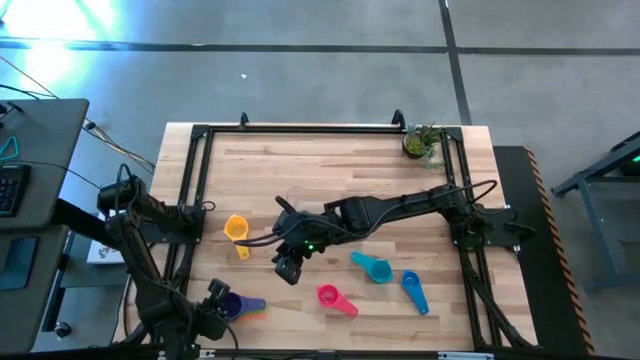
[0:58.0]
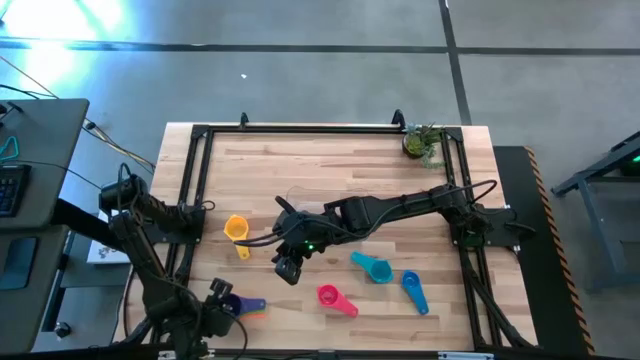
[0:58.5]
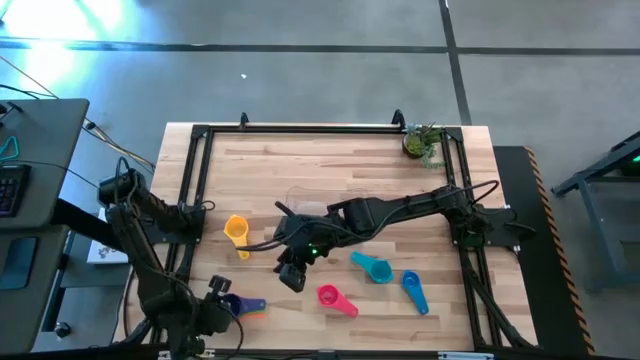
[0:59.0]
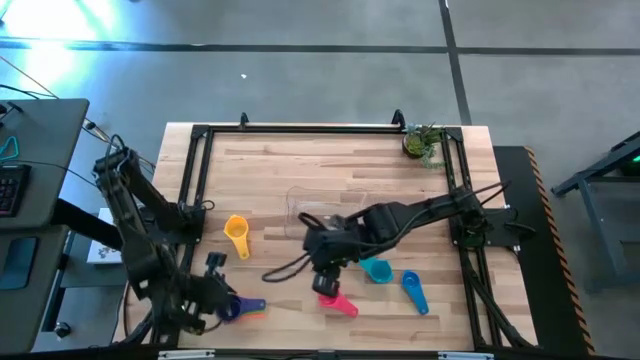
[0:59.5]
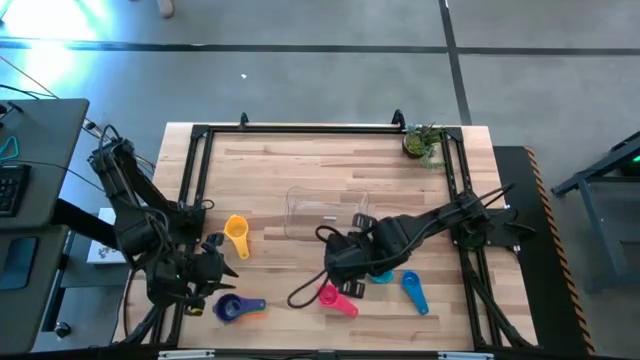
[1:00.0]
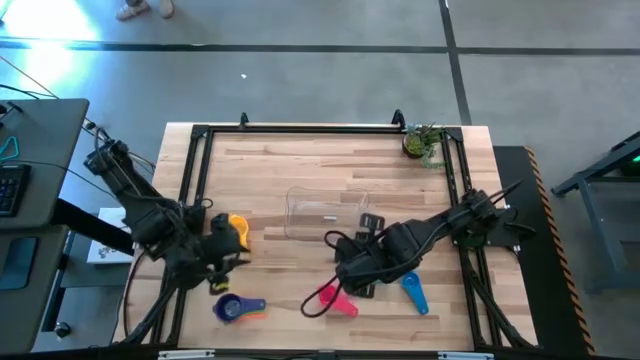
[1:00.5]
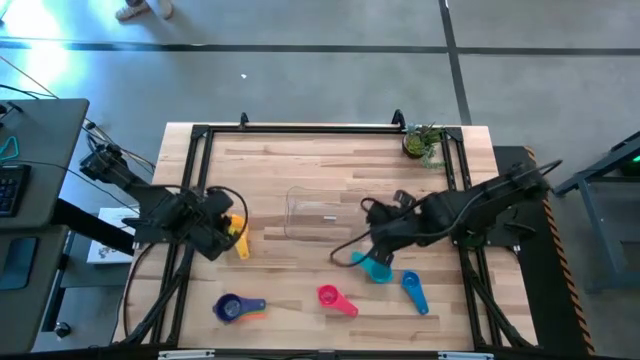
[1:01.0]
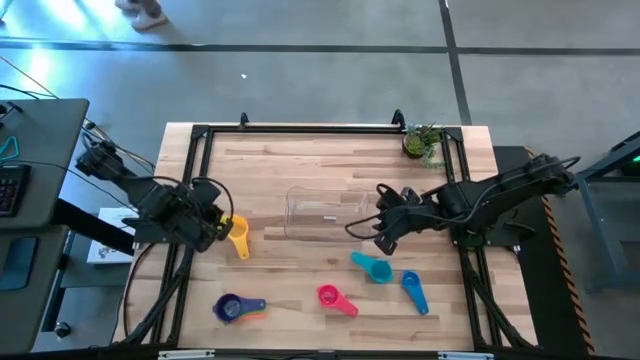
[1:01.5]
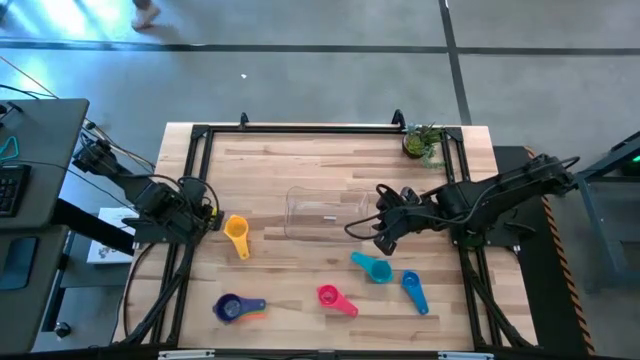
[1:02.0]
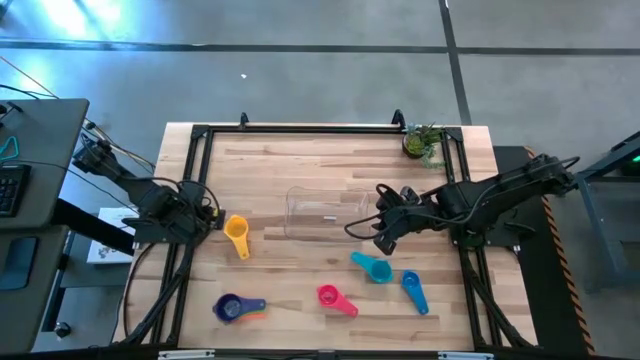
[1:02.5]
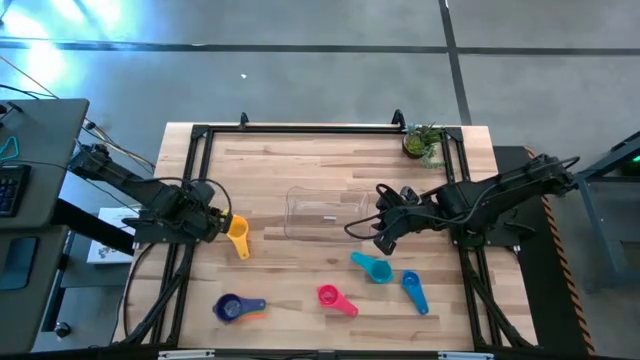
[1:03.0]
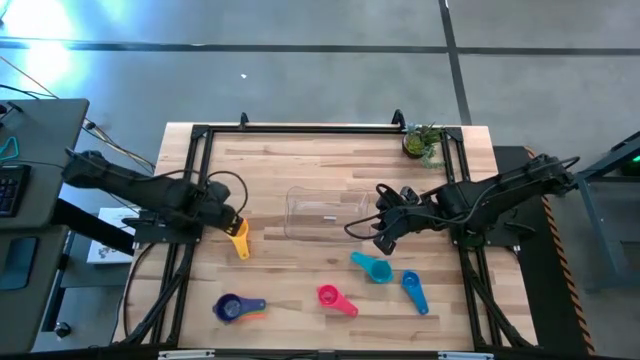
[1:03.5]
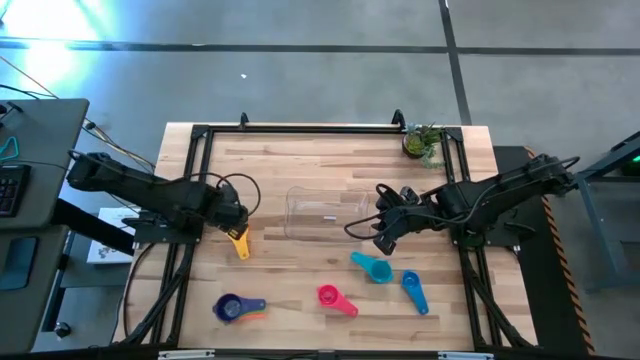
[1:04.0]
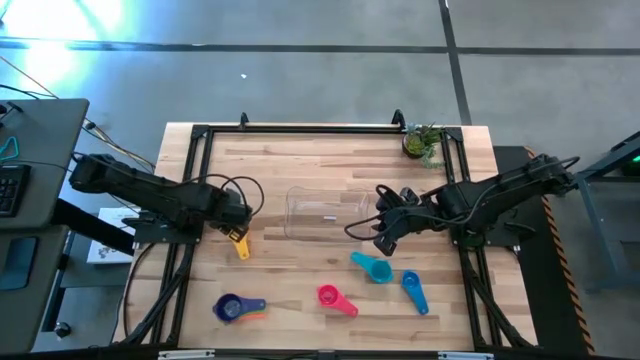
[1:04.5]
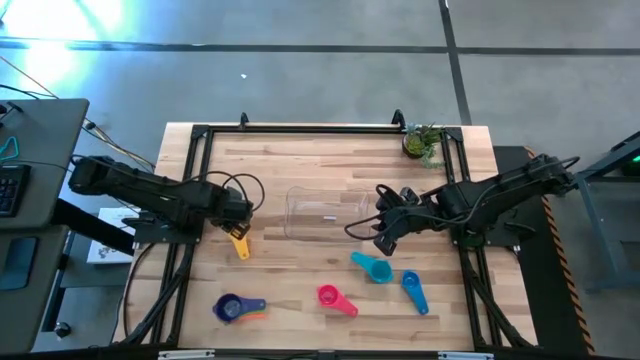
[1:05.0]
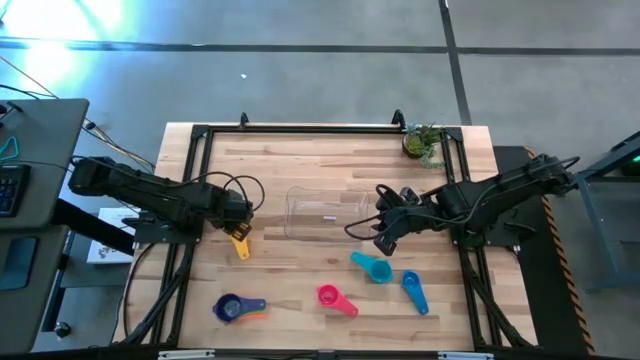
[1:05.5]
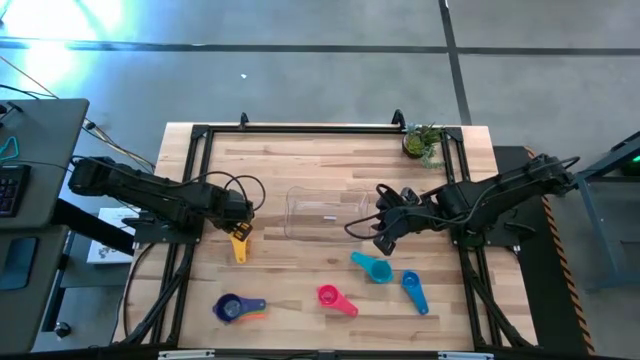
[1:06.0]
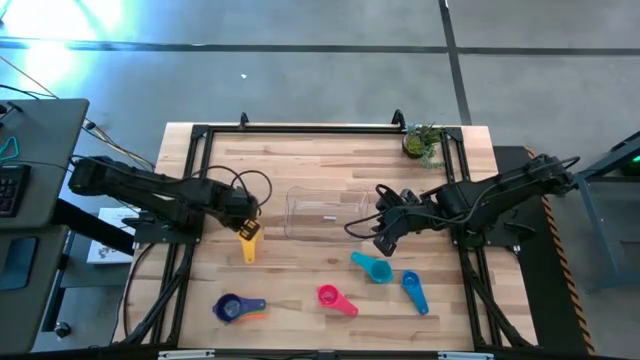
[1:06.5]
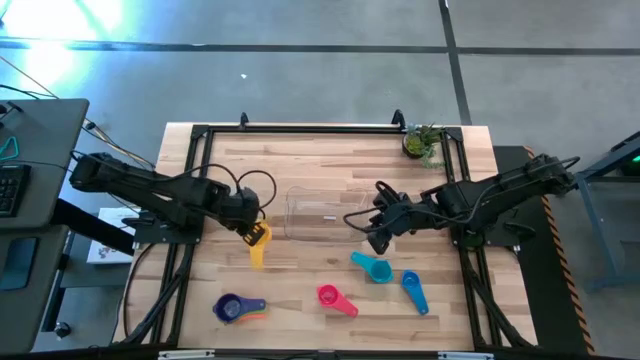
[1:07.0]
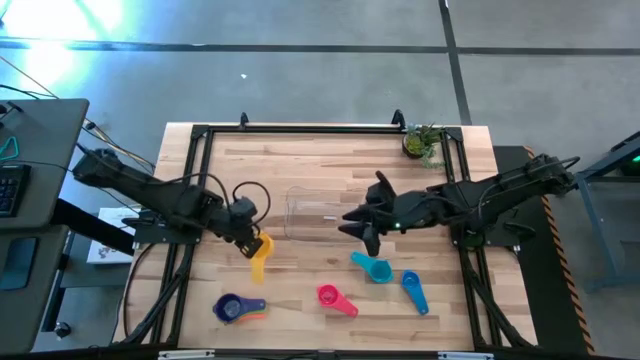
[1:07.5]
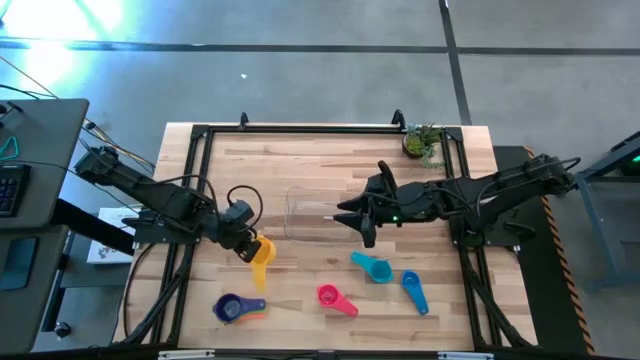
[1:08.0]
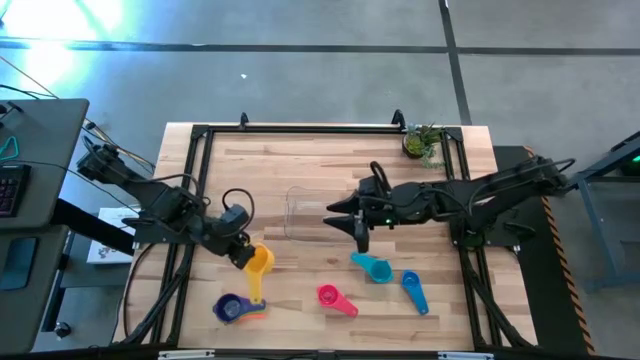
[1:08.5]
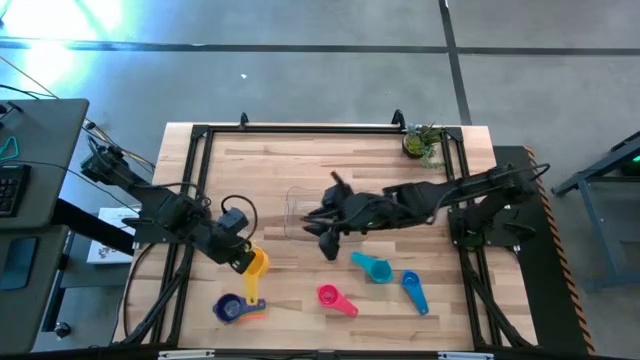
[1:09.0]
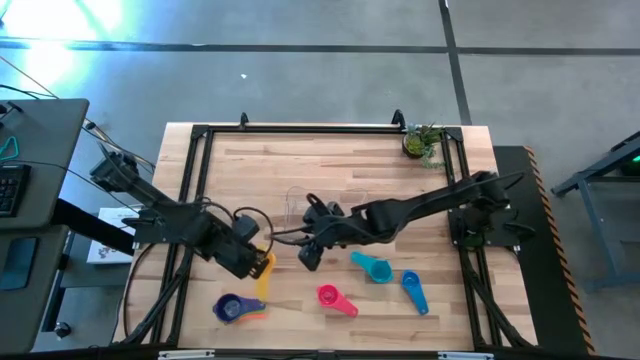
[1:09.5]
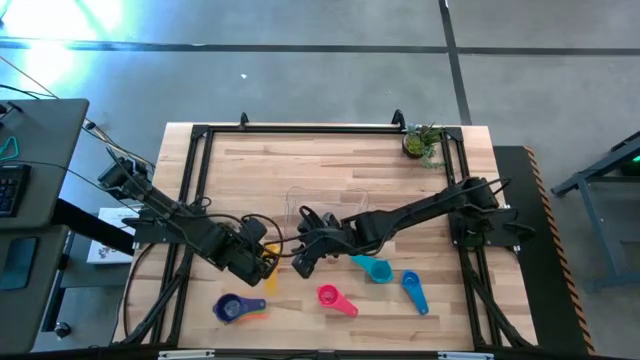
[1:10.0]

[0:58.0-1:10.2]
Task: Nest measuring cups in basket
Stack the yellow measuring cup on top of the dark blue measuring cup

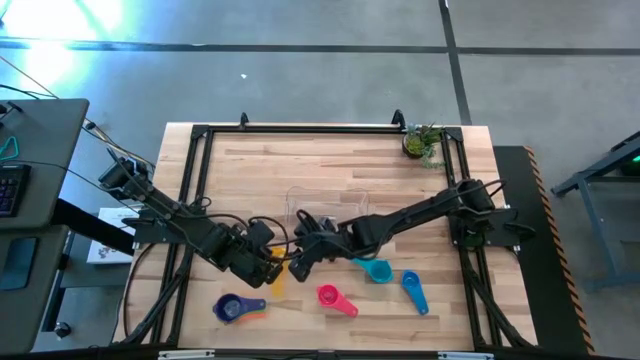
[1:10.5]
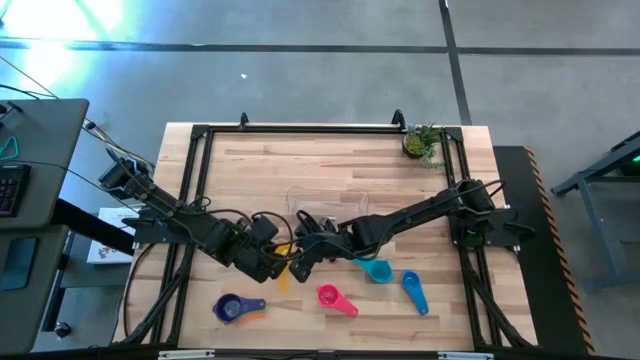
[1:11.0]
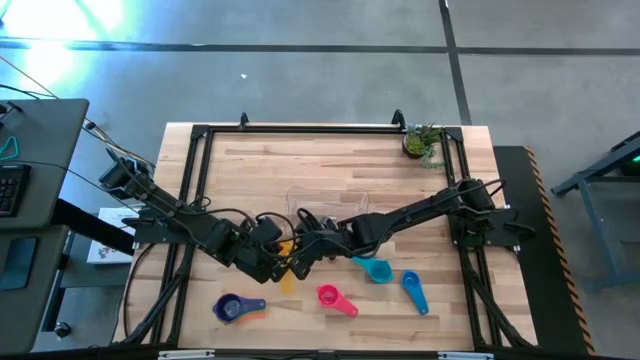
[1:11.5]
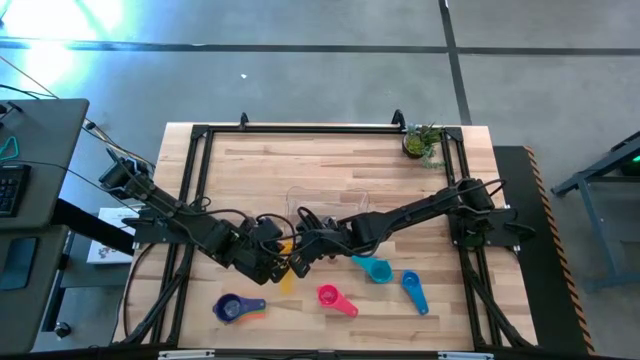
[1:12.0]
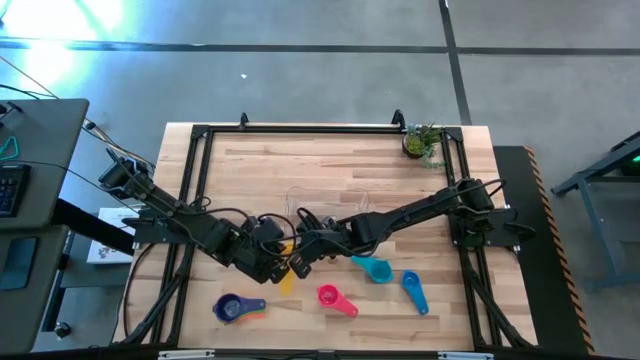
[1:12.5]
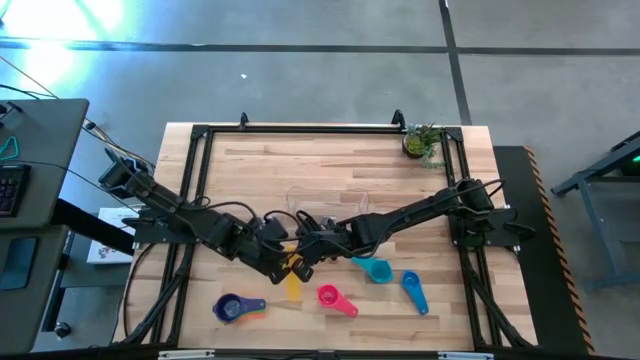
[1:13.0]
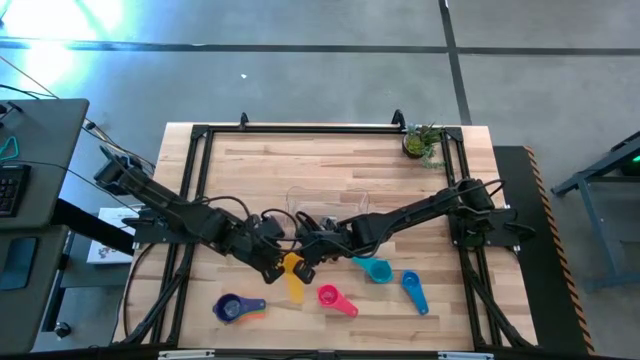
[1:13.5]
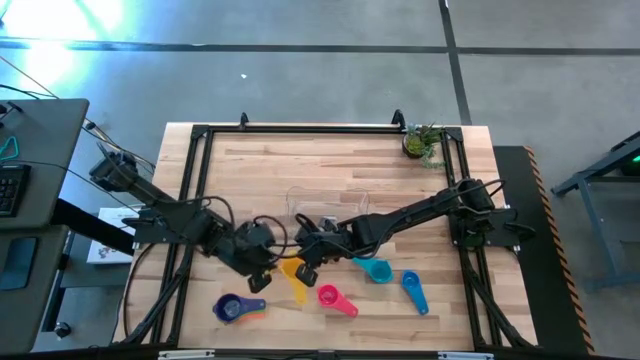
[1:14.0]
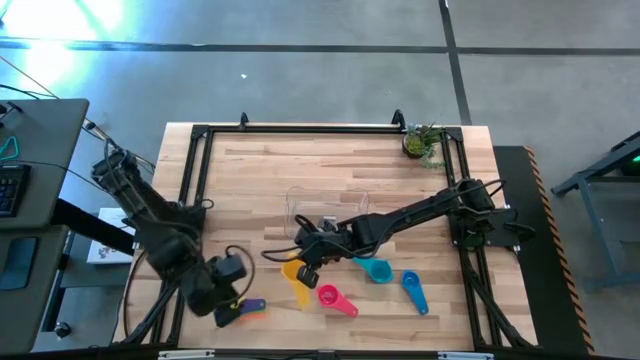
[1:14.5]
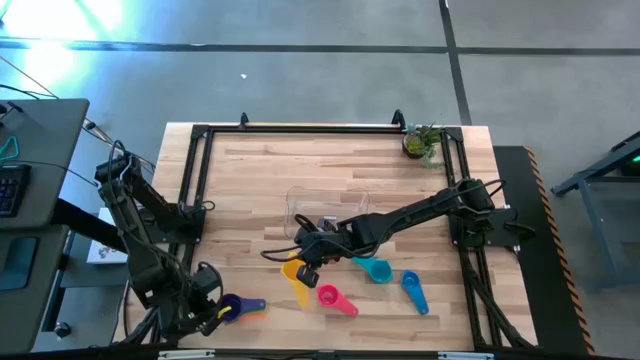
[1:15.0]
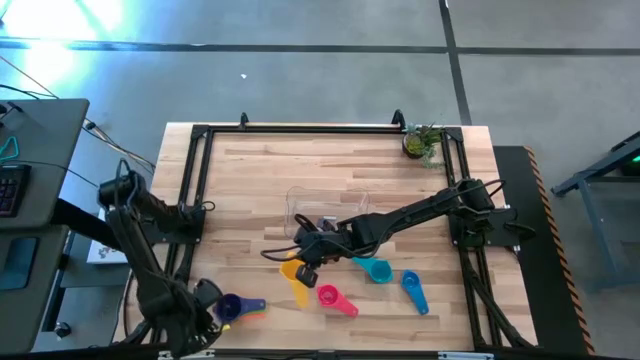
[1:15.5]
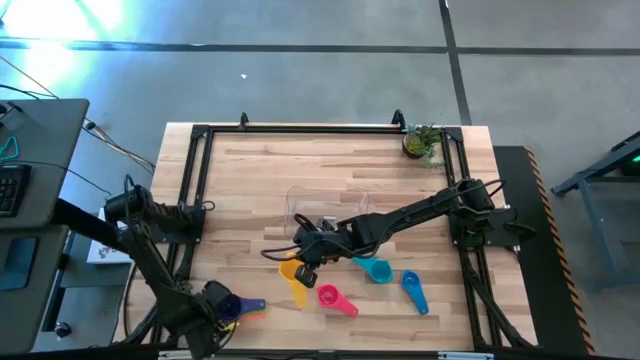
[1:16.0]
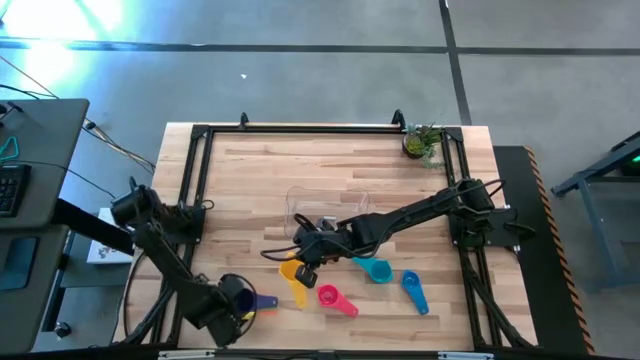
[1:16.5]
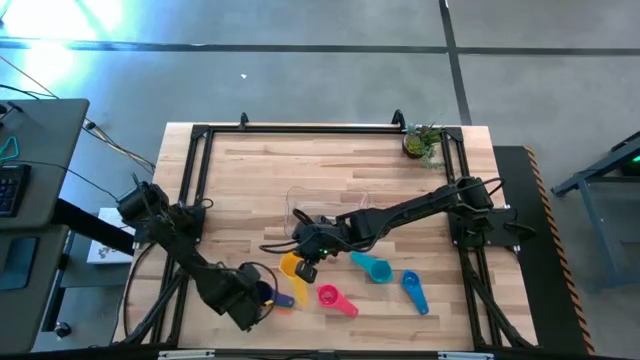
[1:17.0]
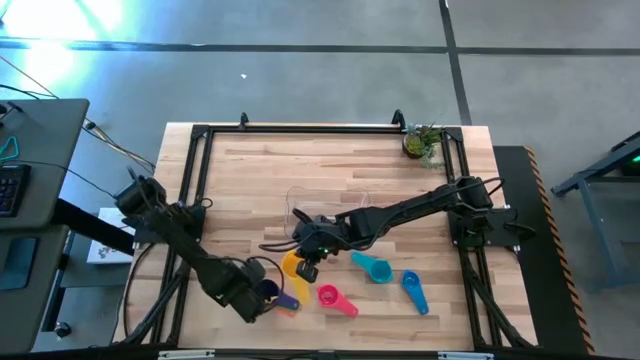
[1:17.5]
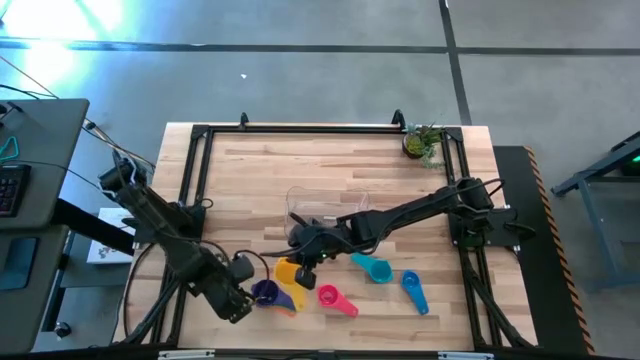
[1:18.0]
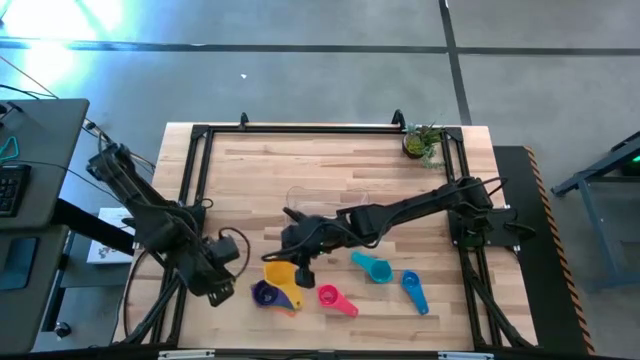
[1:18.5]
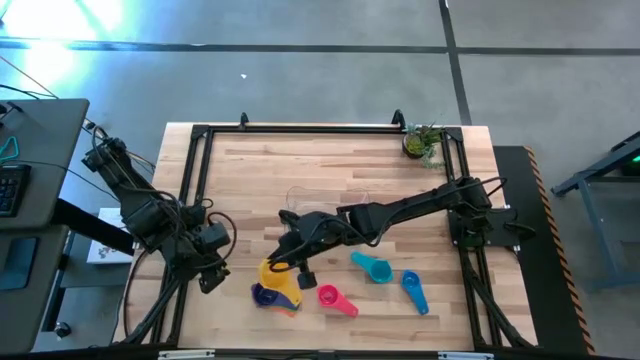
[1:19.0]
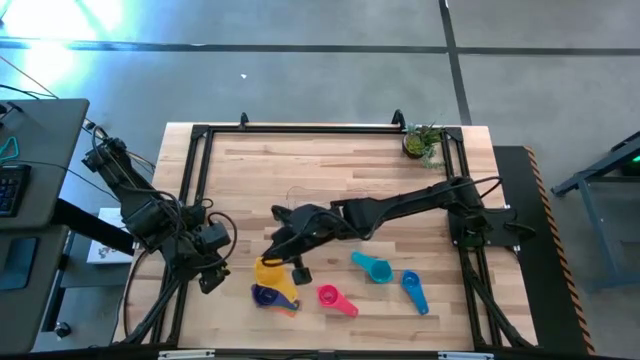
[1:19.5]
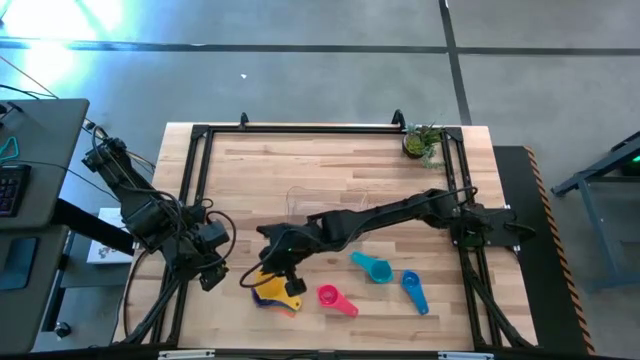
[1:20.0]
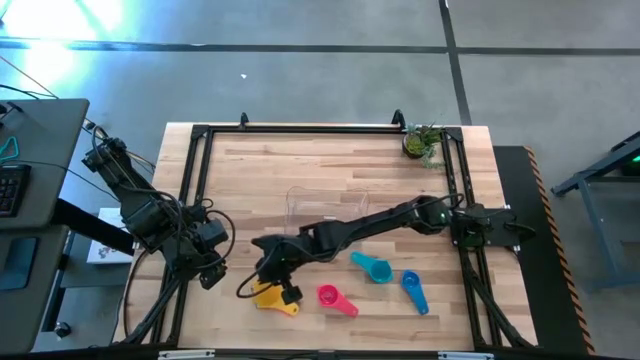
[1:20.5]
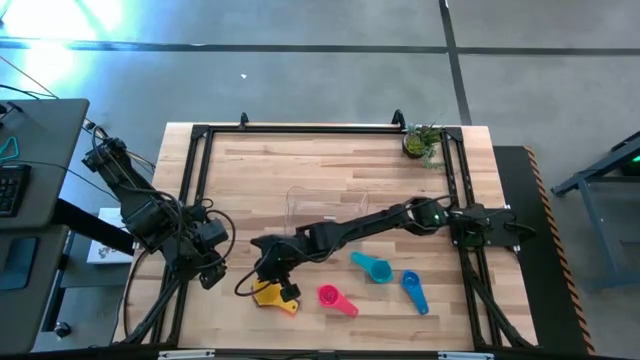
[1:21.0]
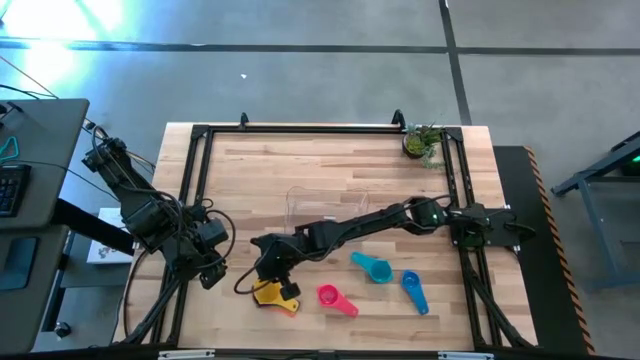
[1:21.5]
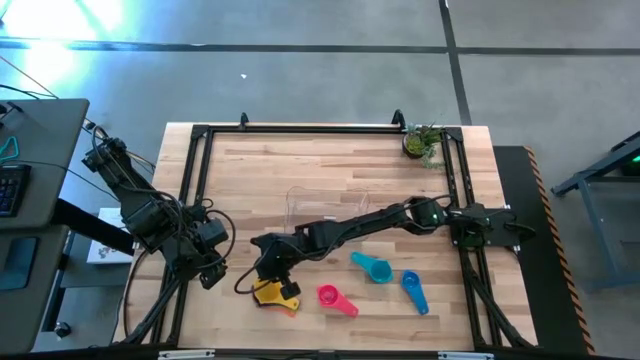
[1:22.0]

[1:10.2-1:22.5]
Stack the yellow measuring cup on top of the dark blue measuring cup
